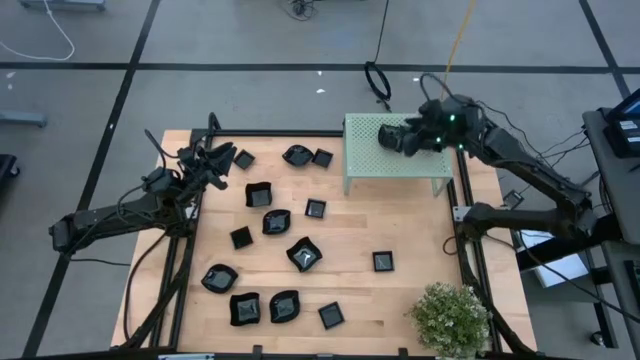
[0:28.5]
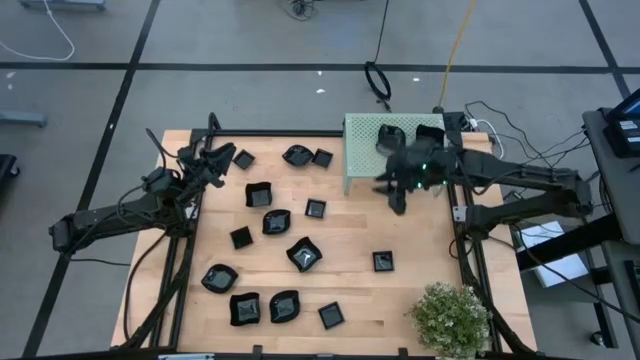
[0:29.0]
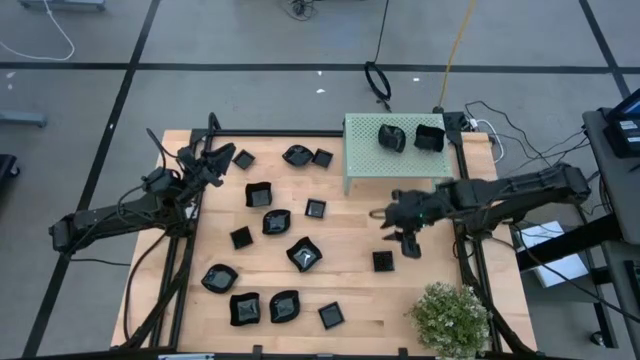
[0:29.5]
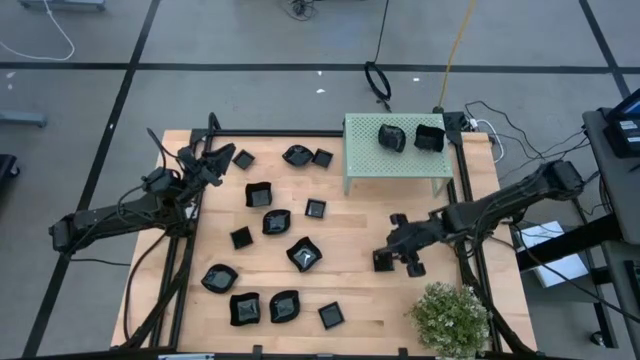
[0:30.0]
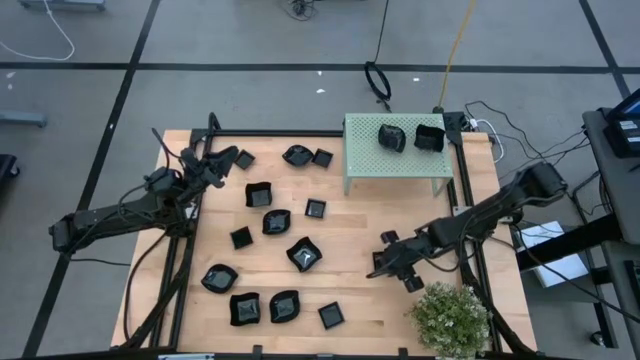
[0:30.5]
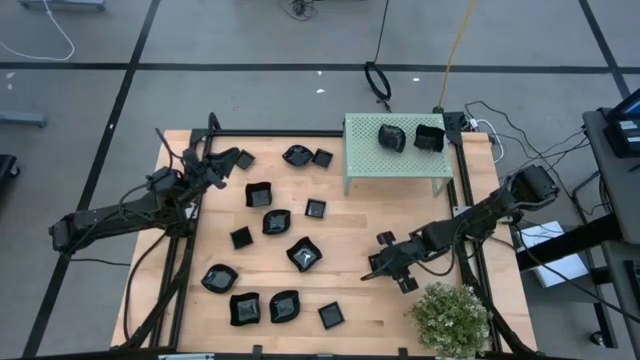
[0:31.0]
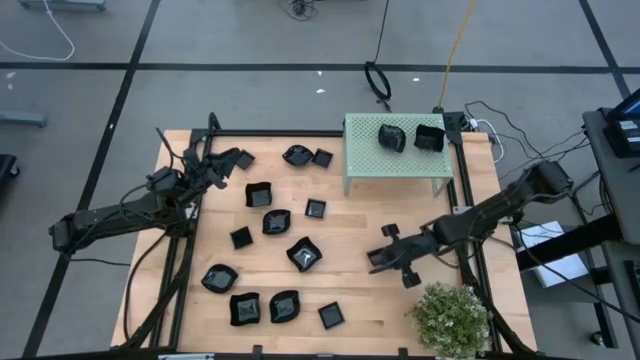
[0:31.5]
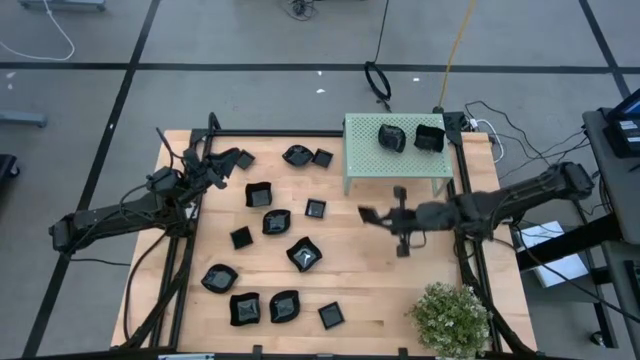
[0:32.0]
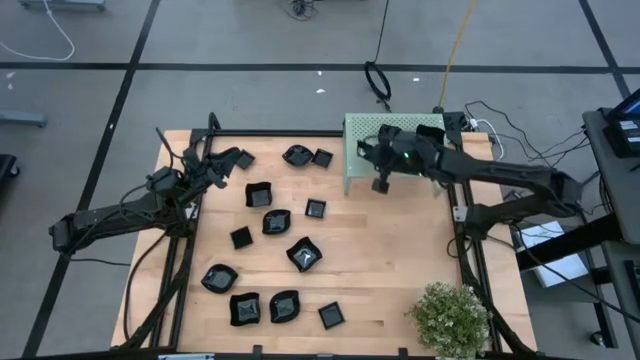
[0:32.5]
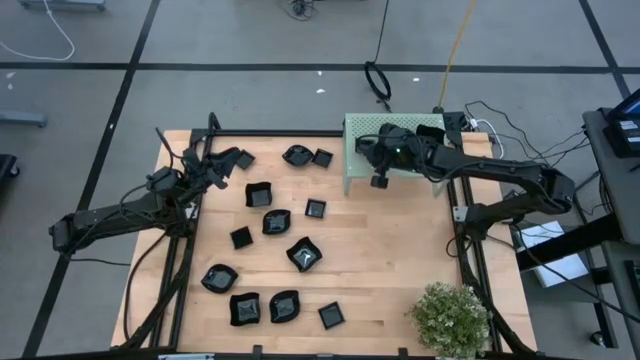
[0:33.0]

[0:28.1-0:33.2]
Task: Pick & Place Mini shaped plates
Put the square plate on the shelf

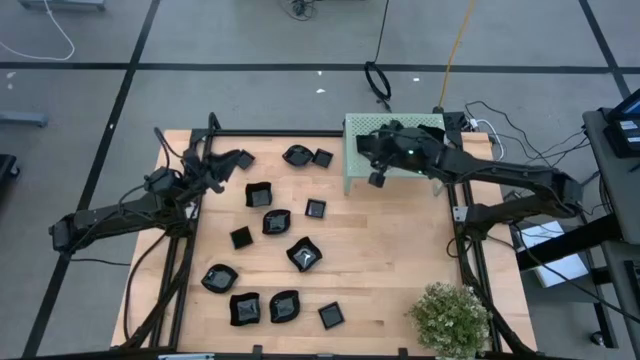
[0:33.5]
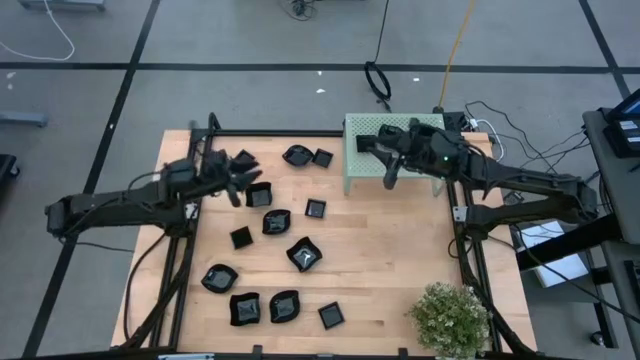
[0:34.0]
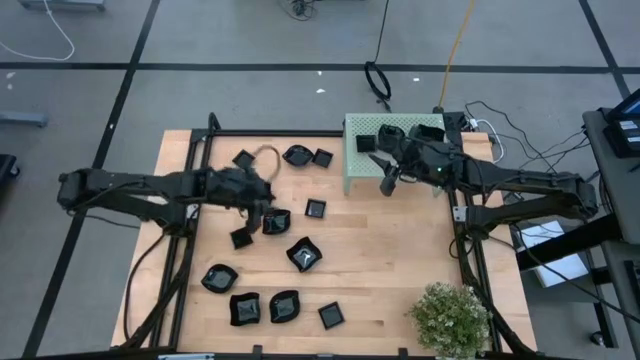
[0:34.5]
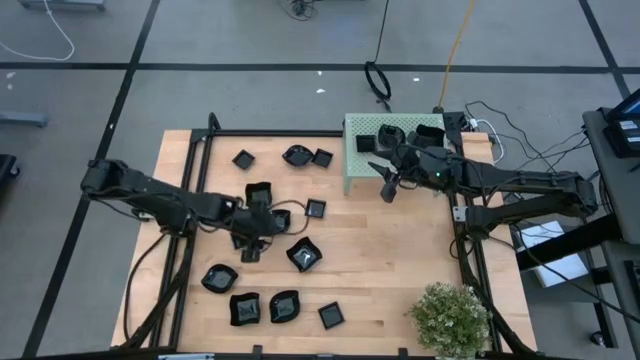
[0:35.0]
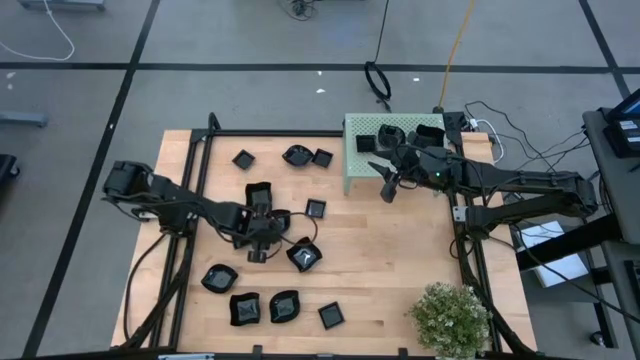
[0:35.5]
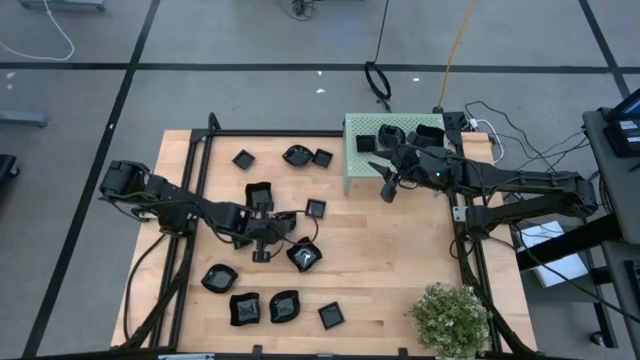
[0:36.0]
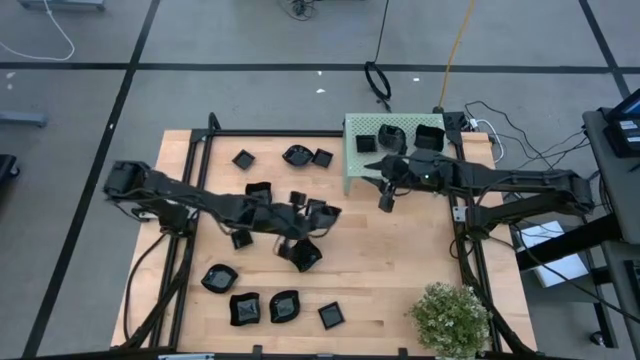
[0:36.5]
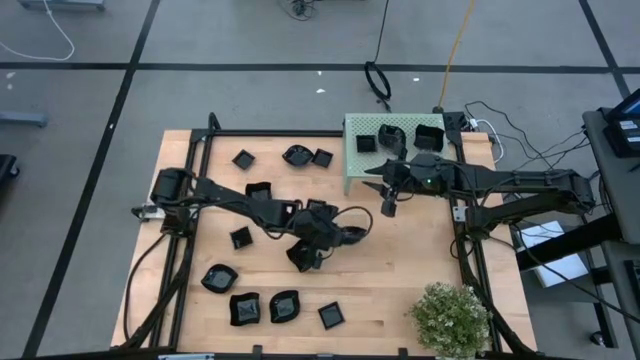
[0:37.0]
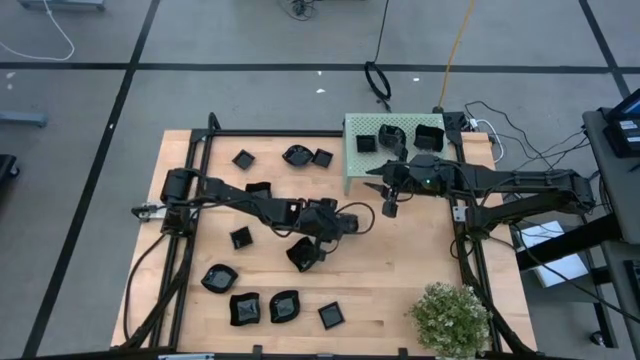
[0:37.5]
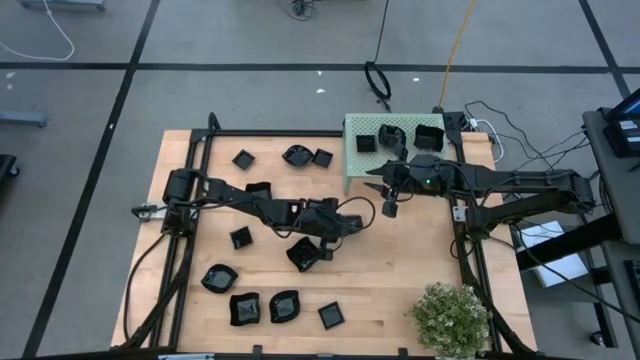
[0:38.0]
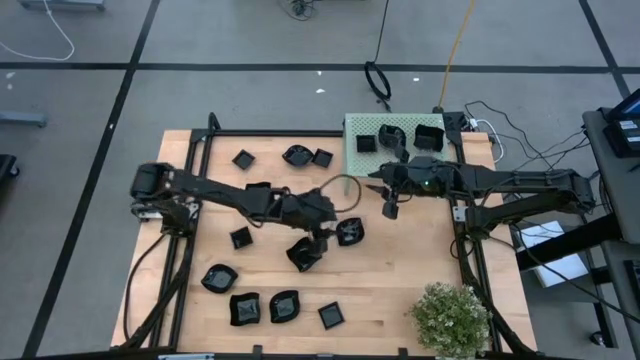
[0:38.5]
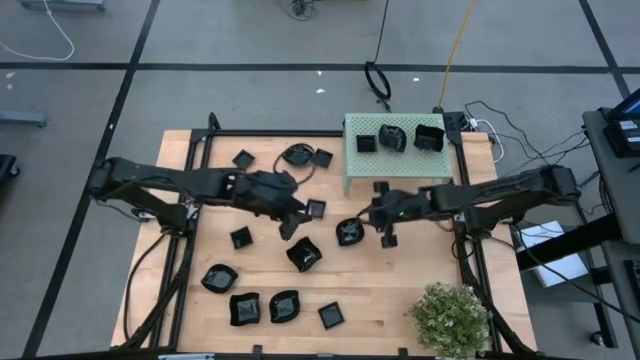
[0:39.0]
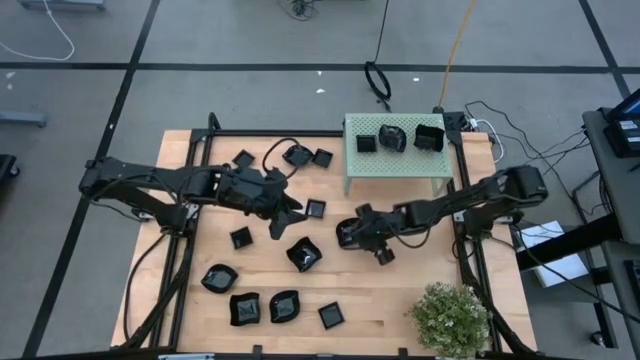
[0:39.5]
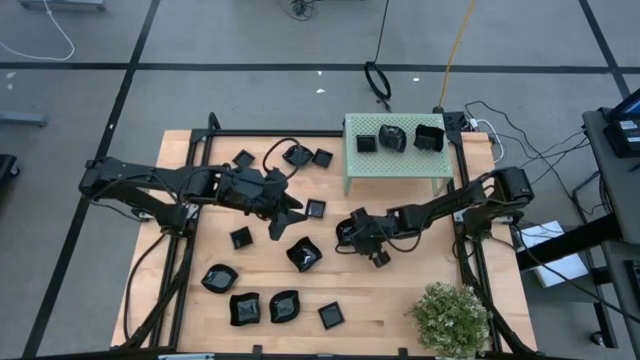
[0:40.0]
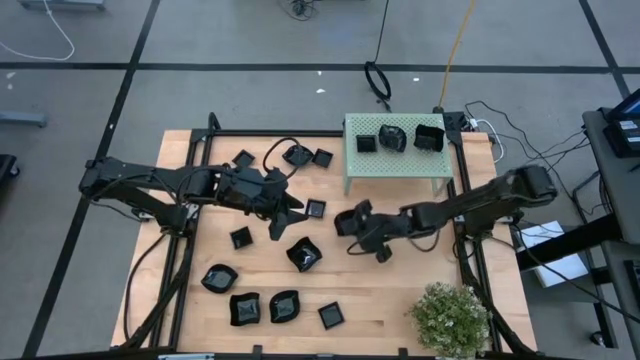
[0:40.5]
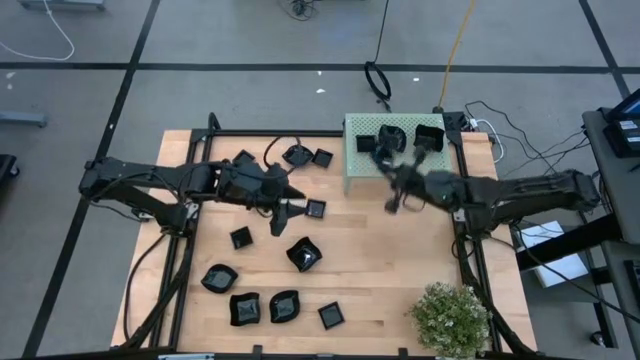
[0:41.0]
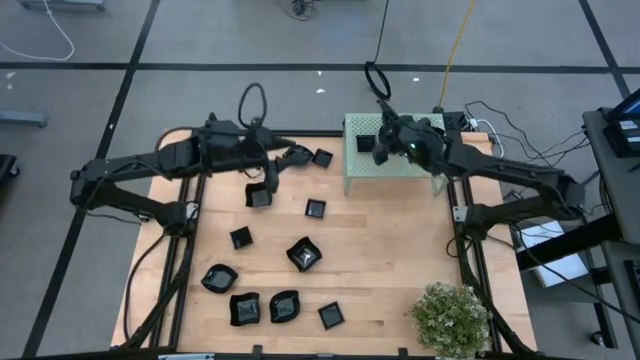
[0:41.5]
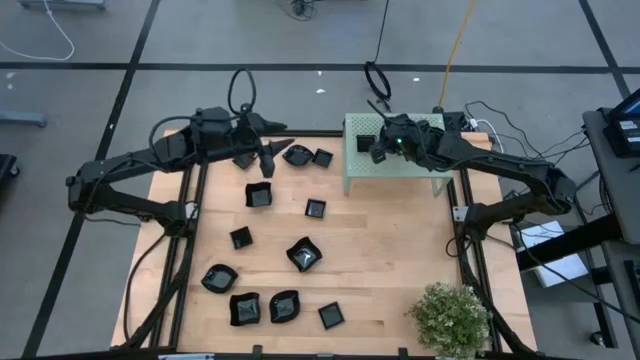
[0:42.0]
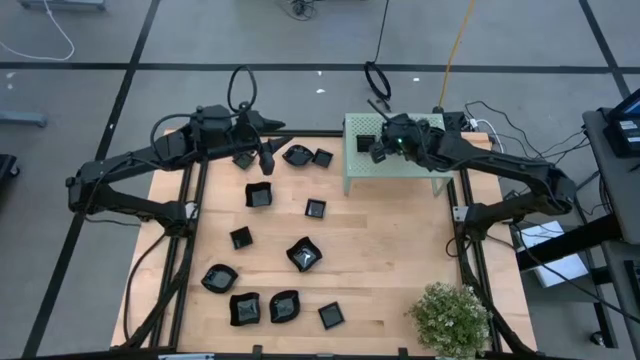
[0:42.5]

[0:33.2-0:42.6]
Stack the leaf-shaped plate on top of the leaf-shaped plate on the shelf

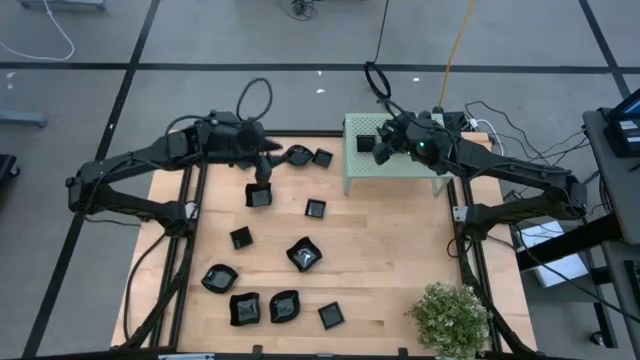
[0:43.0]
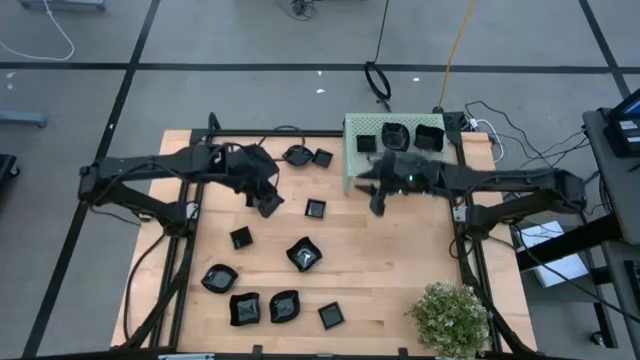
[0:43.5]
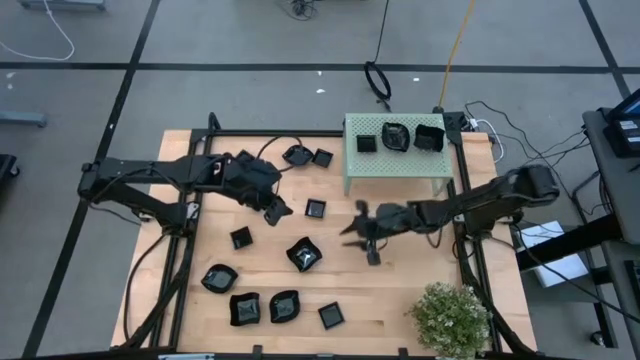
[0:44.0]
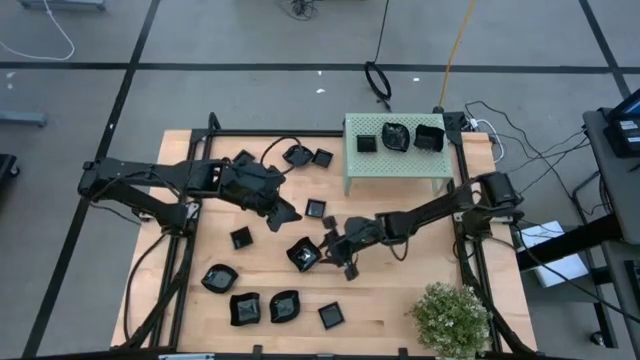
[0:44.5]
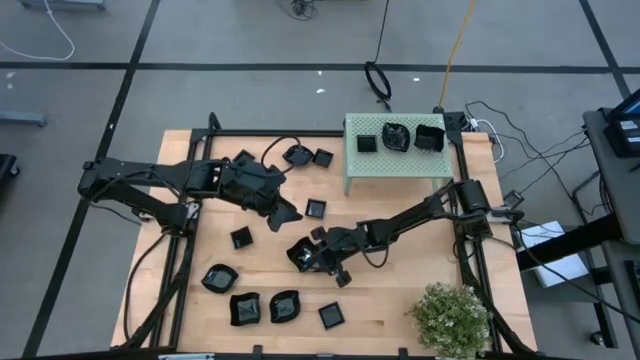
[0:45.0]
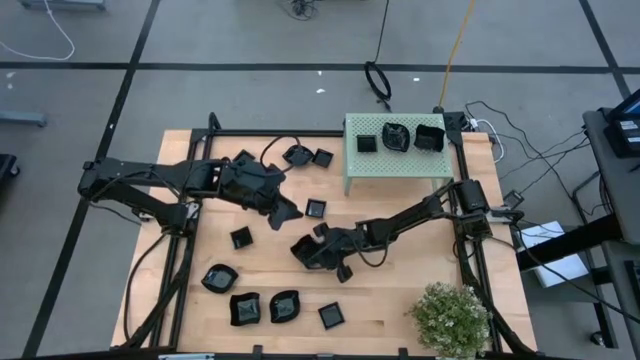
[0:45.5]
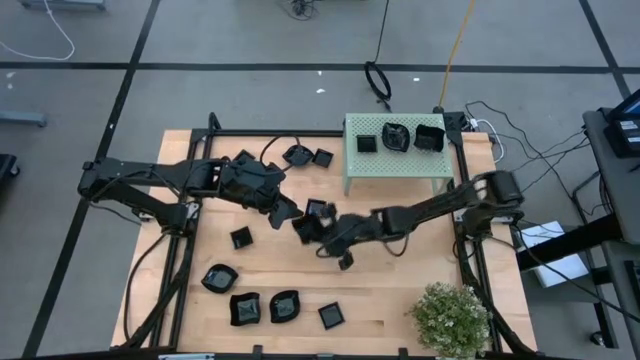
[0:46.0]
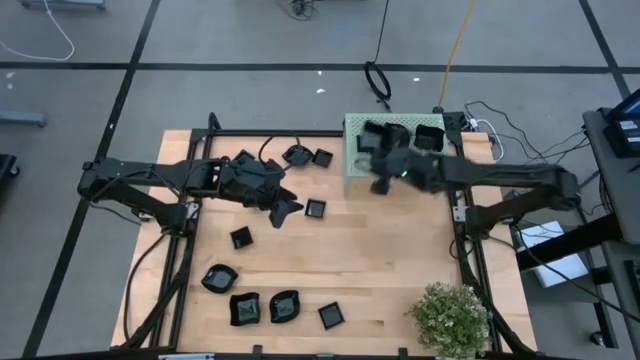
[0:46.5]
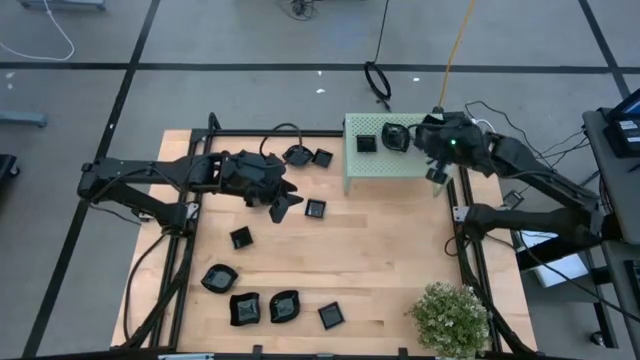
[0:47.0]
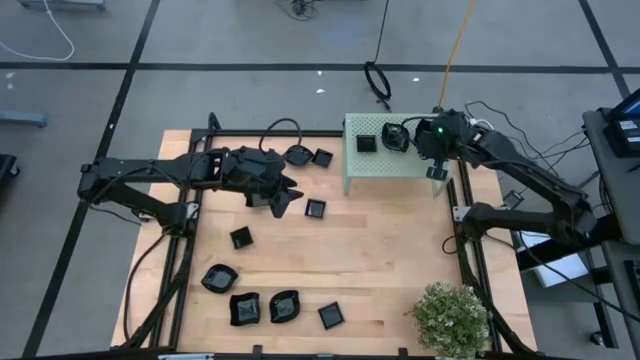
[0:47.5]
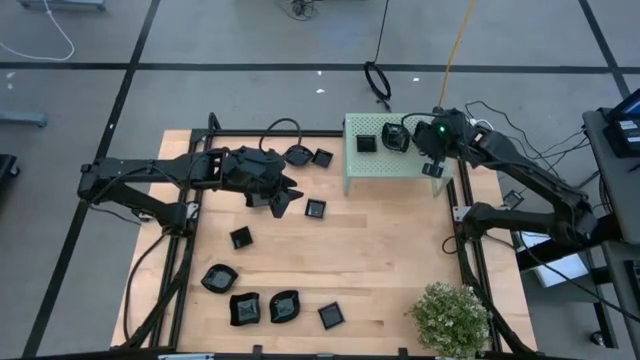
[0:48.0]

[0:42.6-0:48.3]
Stack the middle distorted square plate on top of the distorted square plate on the shelf
